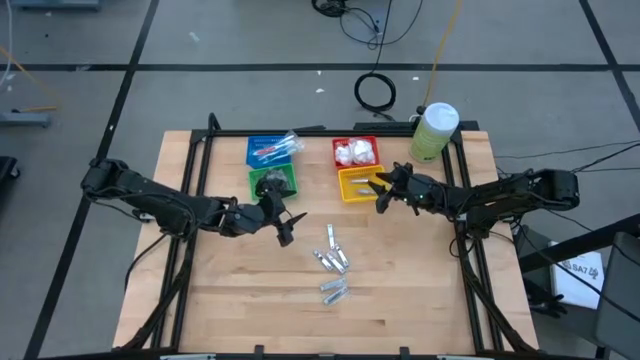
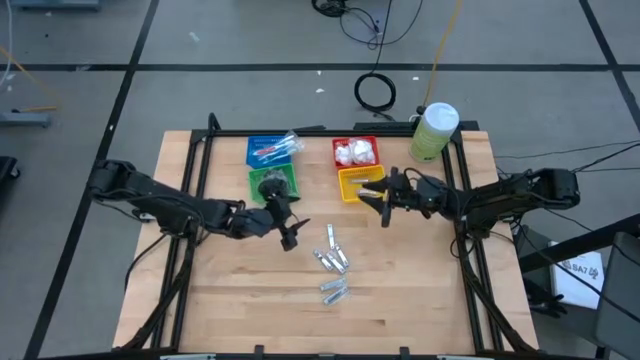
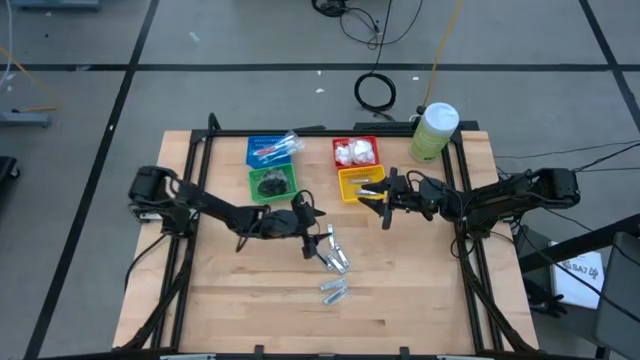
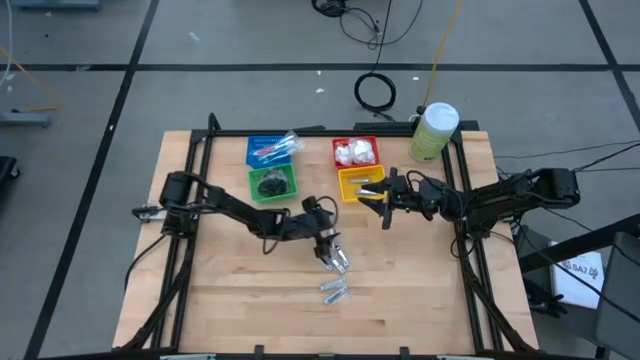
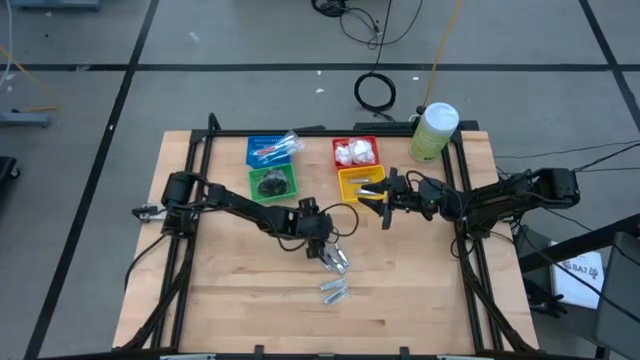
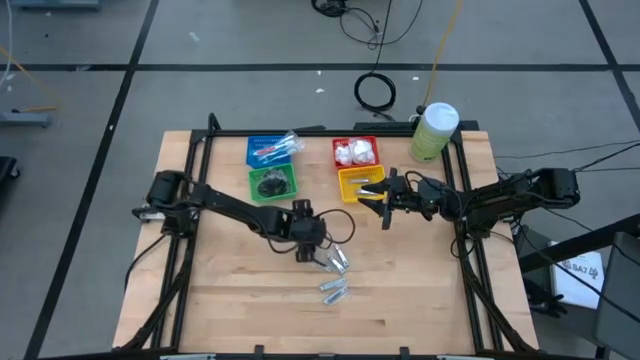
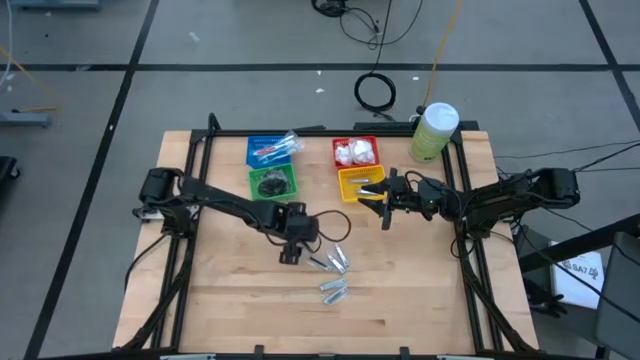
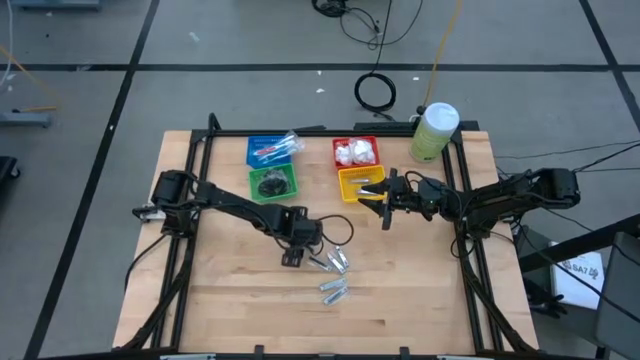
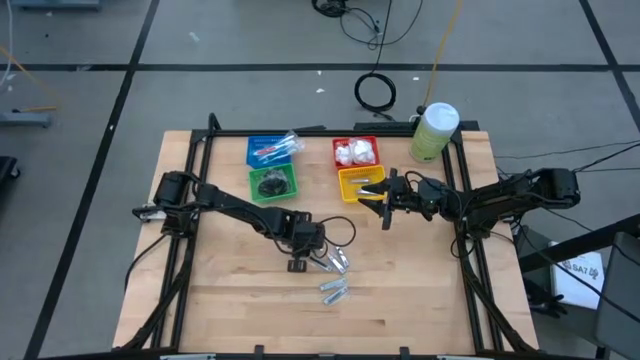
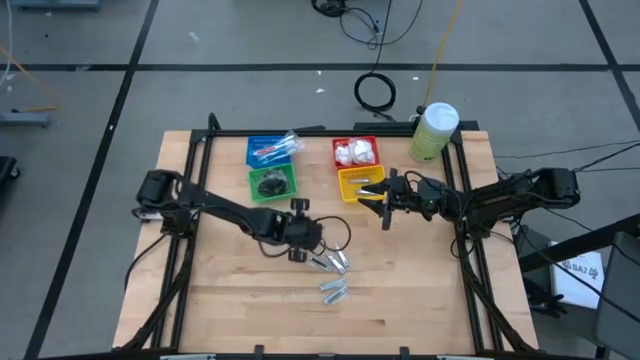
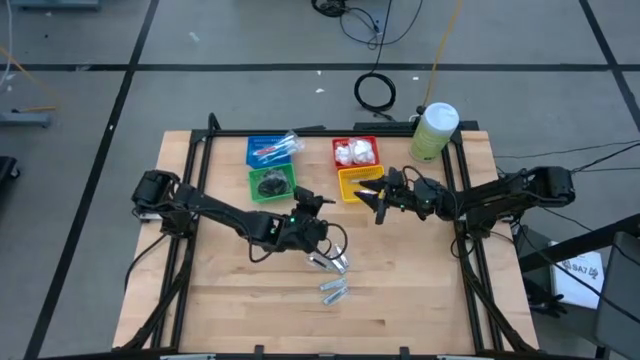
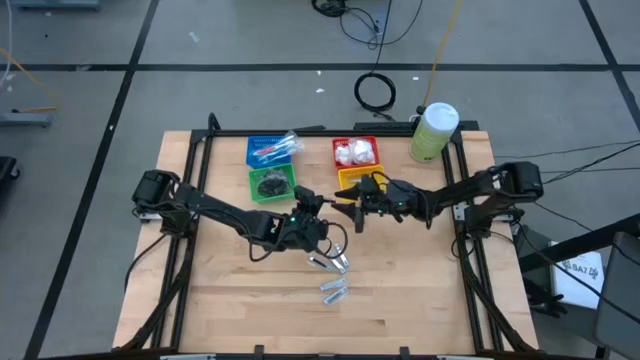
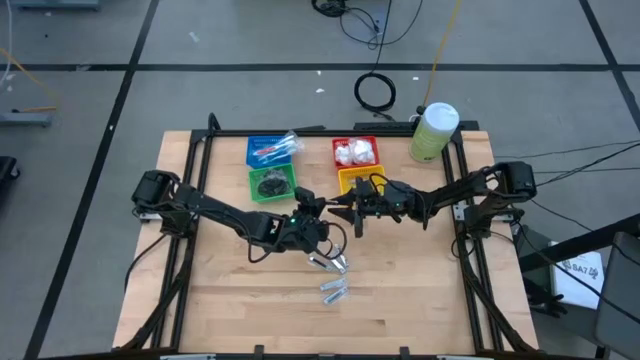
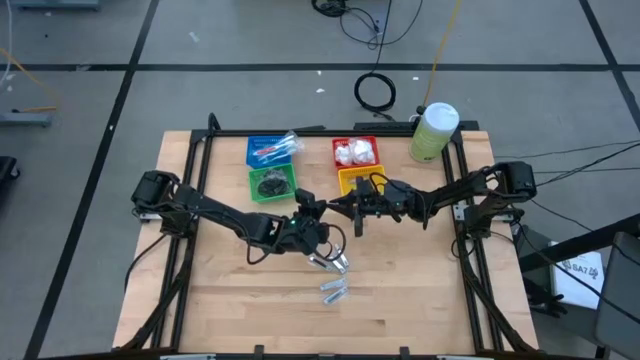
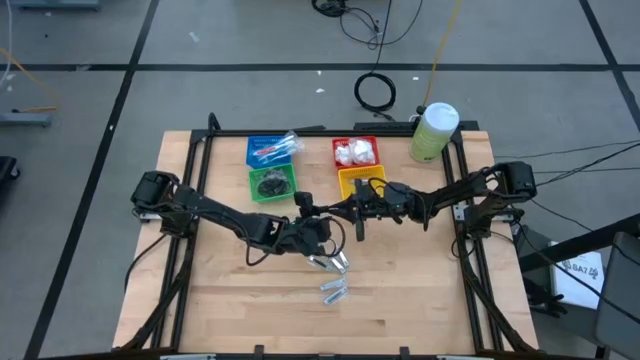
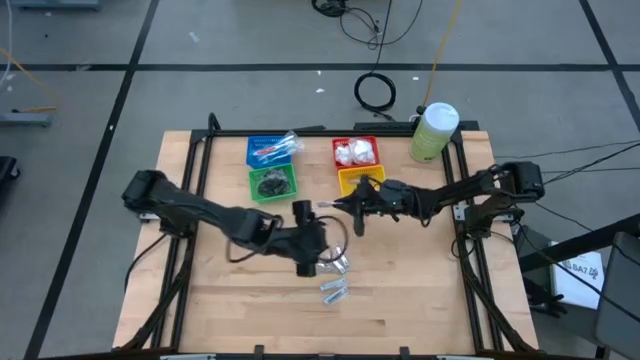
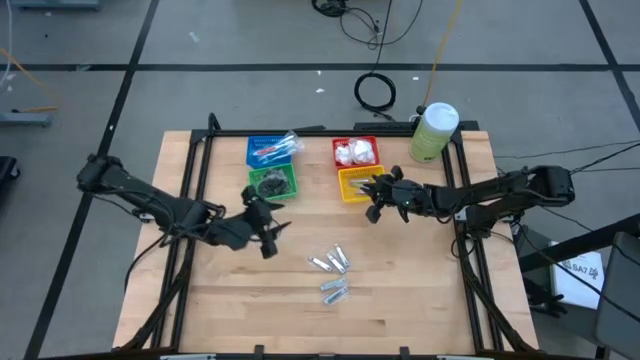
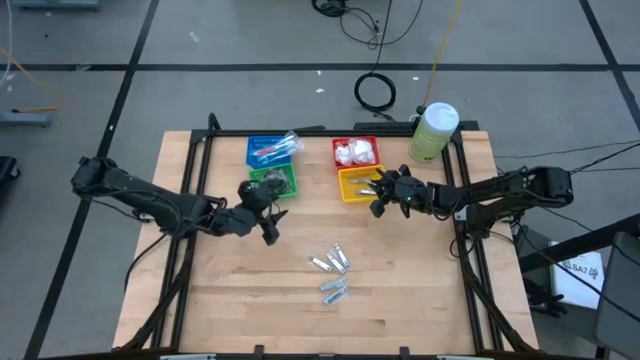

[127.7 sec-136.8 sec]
Task: Pick & Place Travel size toiletries
Put the nail cutter into the yellow bin

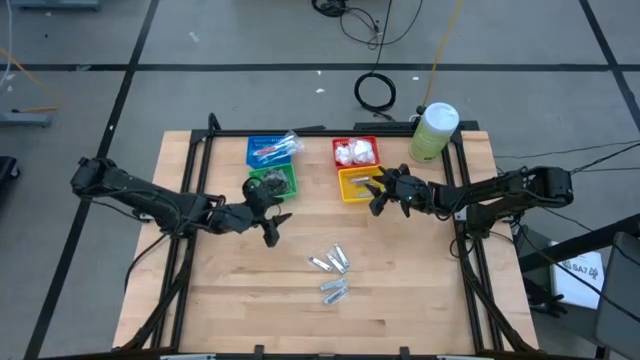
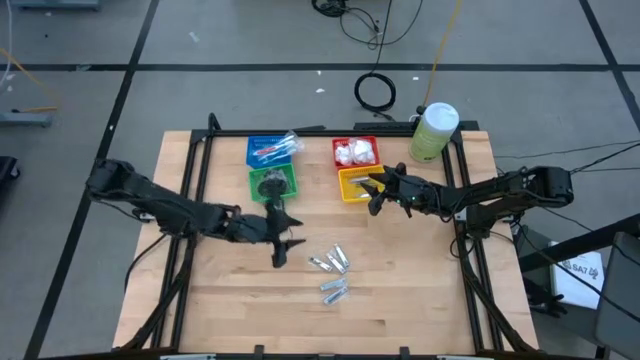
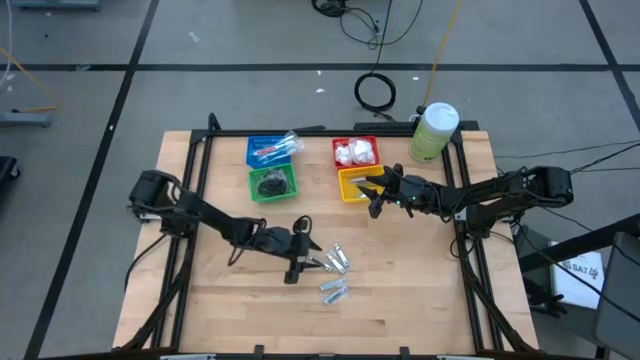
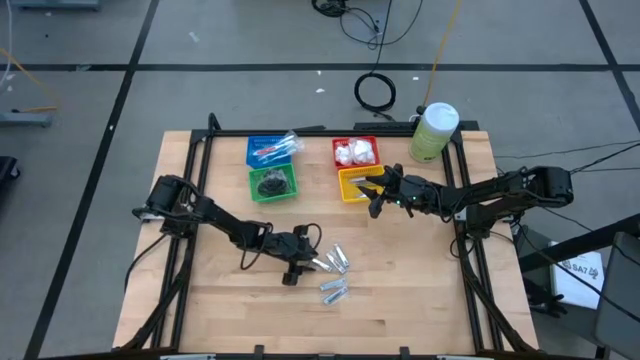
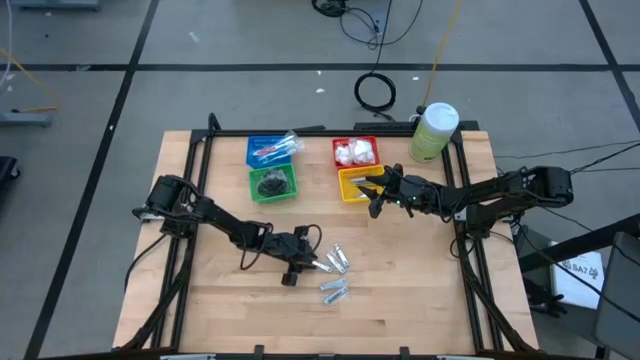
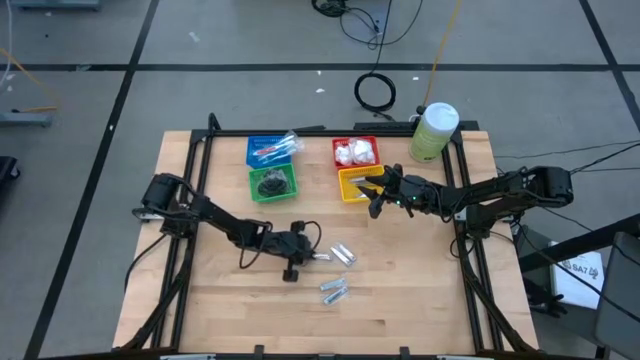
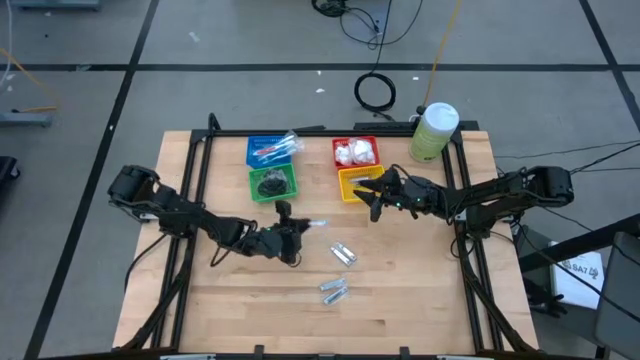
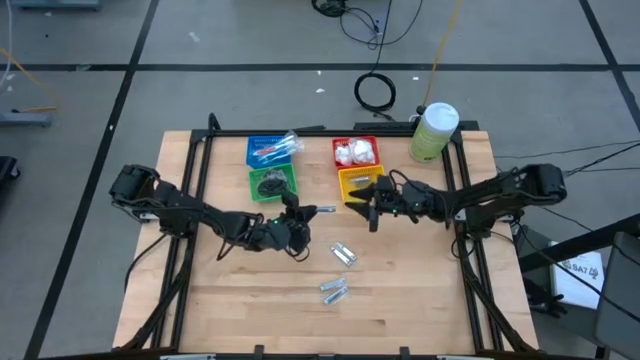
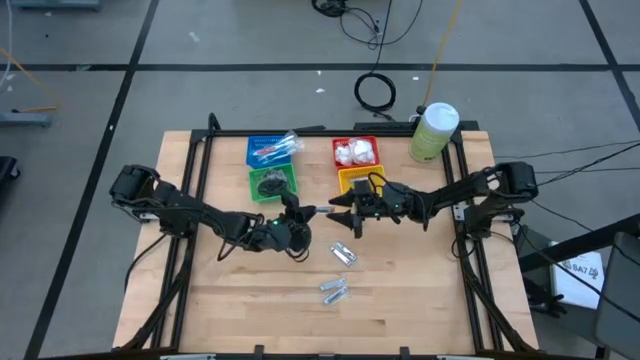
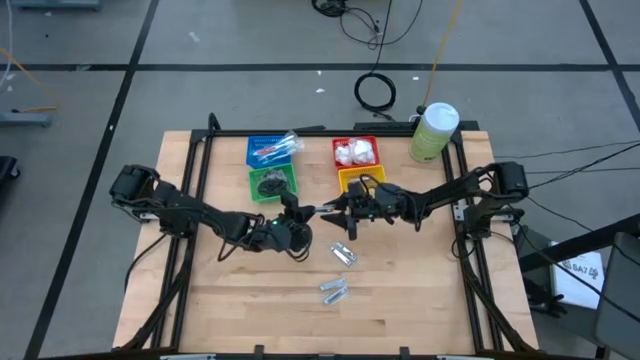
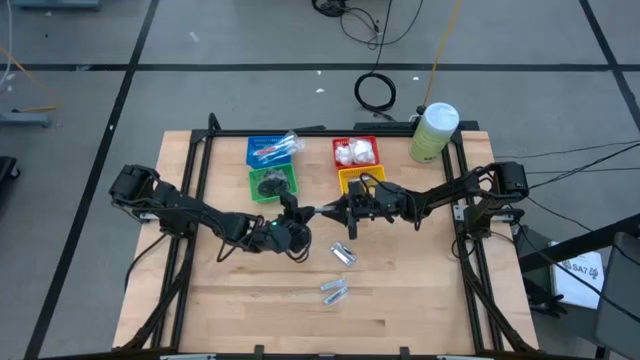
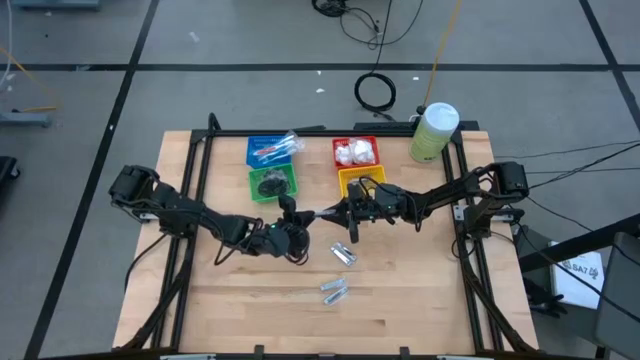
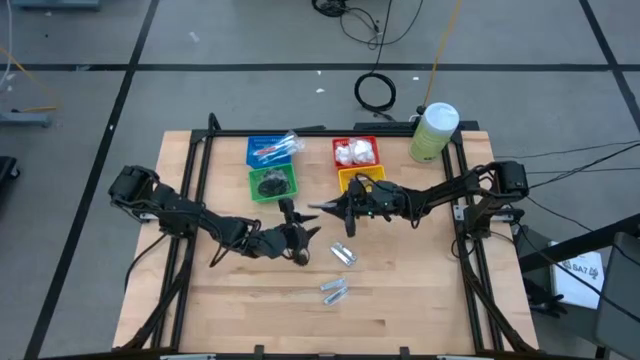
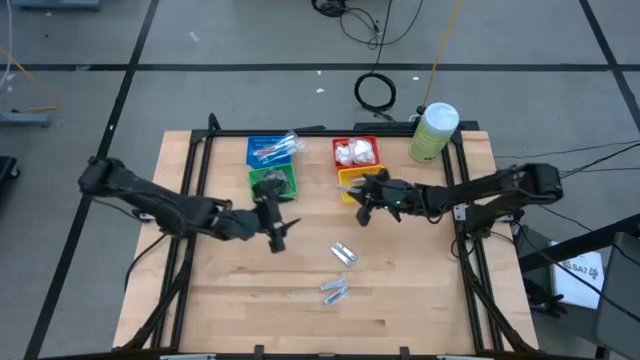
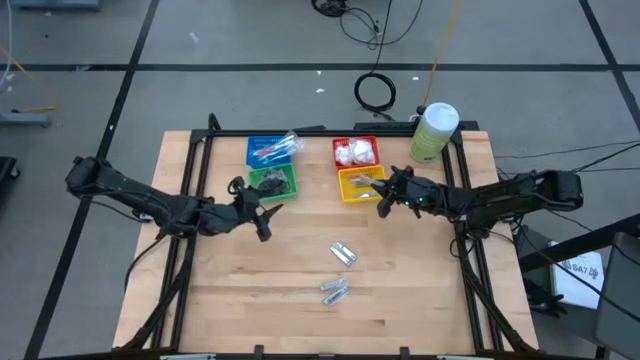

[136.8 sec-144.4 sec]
Put the nail cutter into the yellow bin

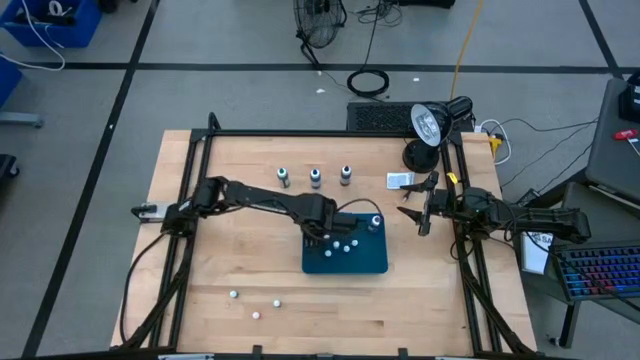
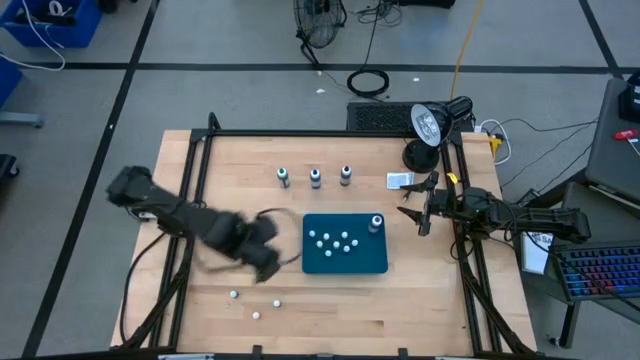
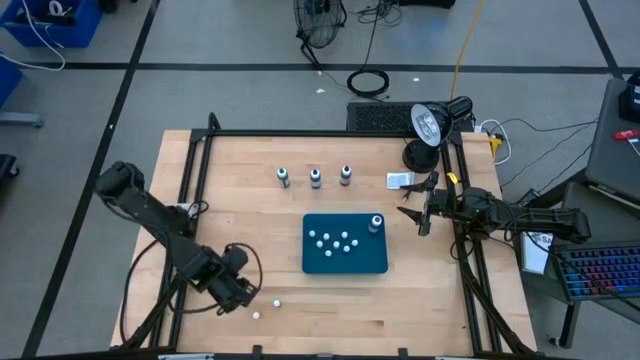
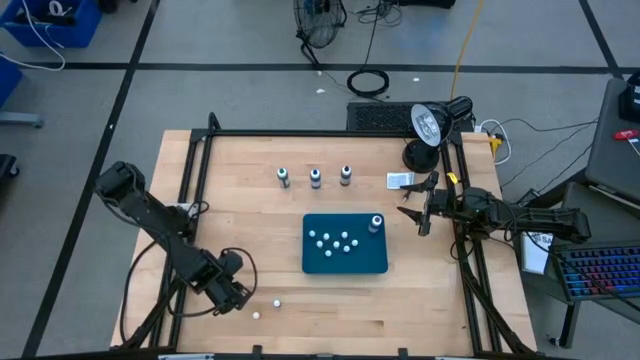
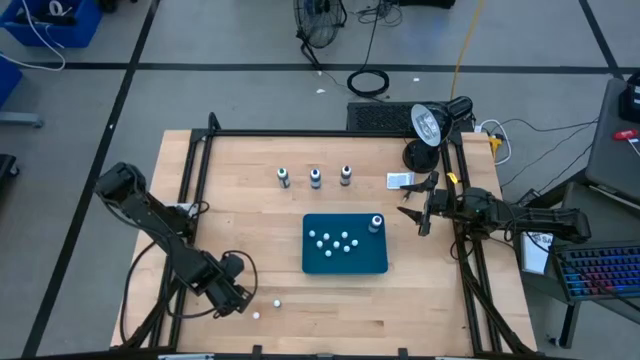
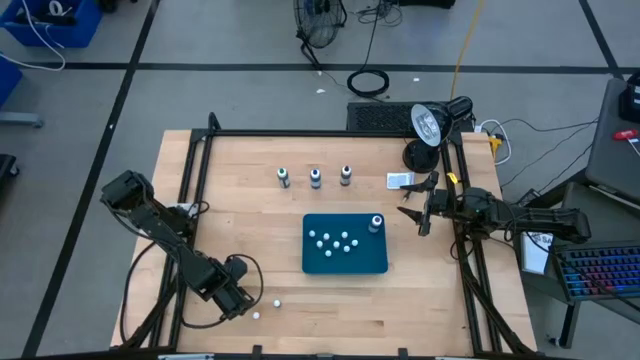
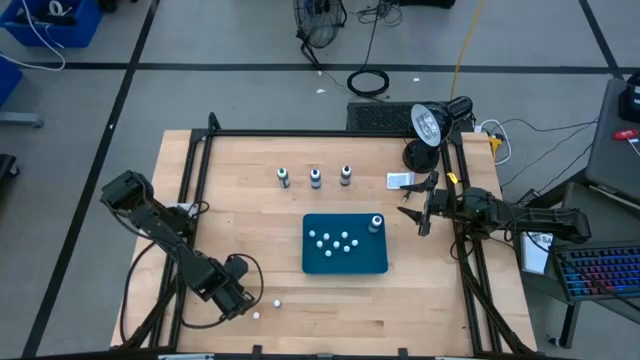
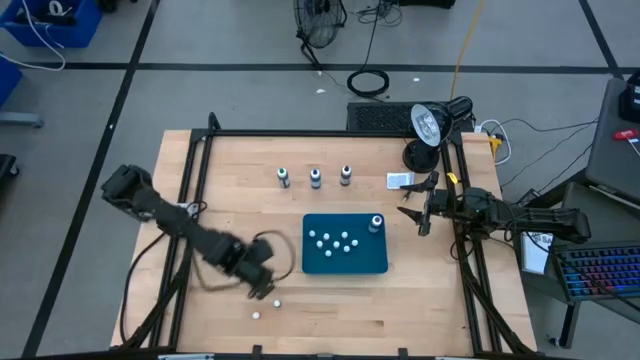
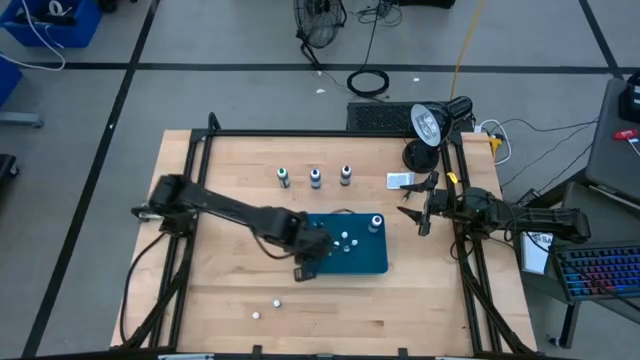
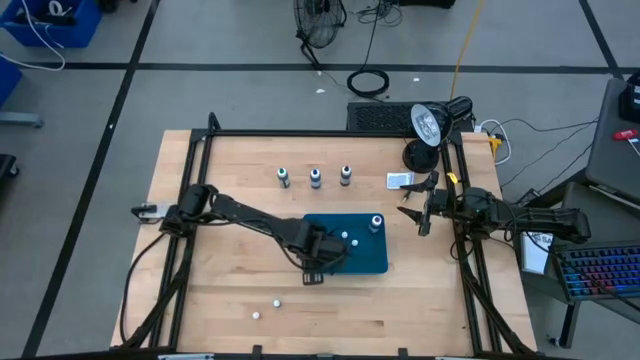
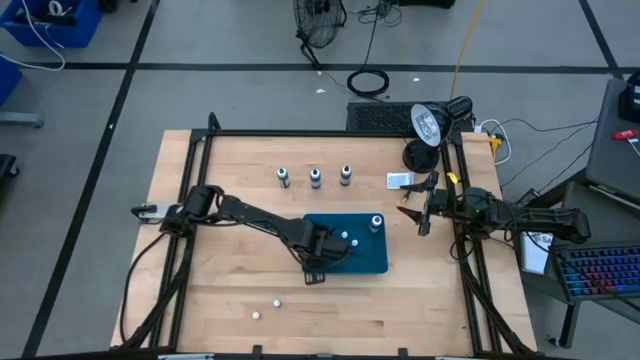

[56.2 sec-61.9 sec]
Task: Pick & Place food coloring
Put the small blue food coloring bottle into the blue bin
